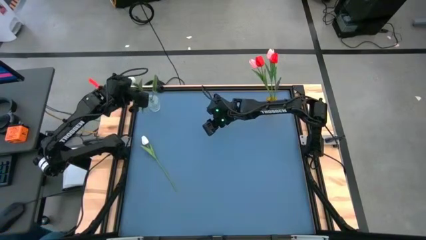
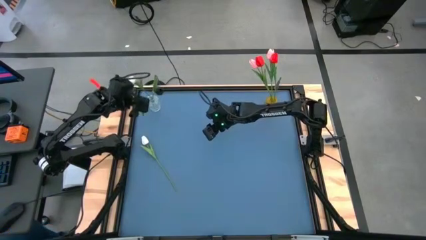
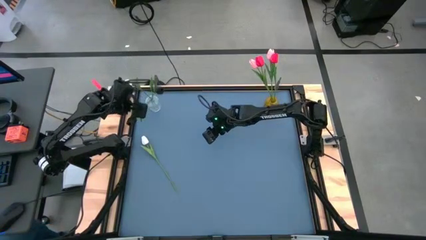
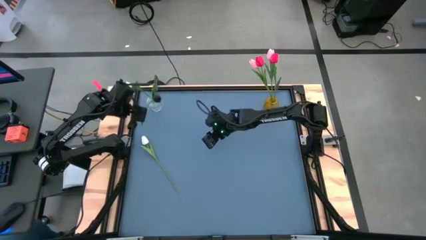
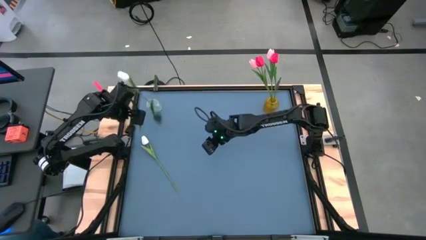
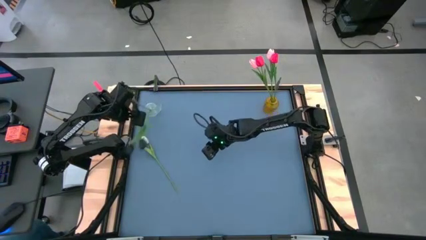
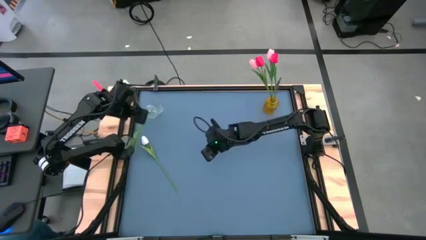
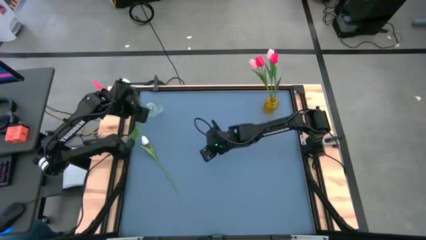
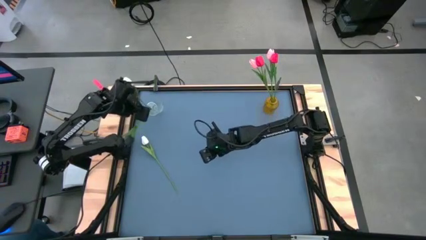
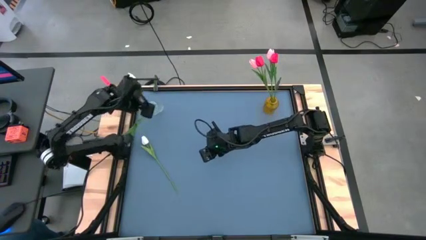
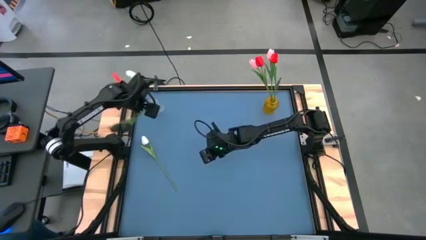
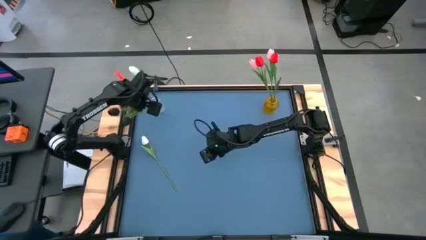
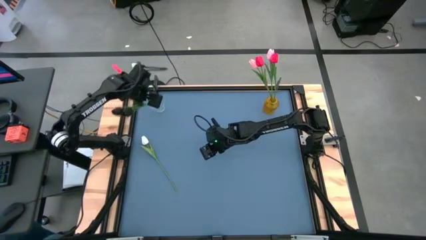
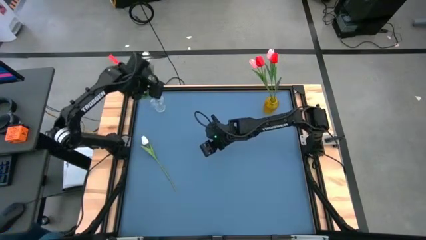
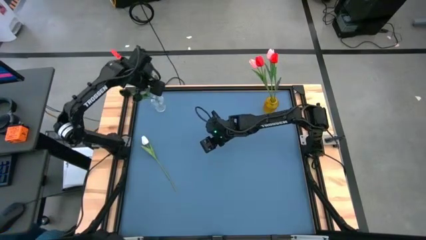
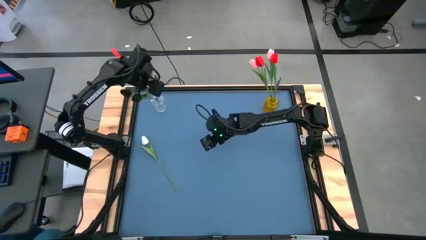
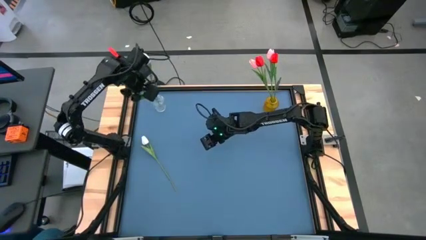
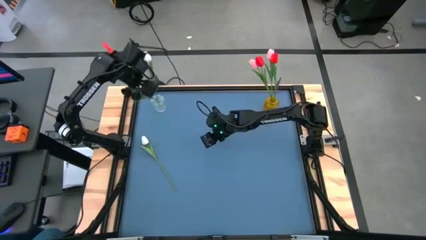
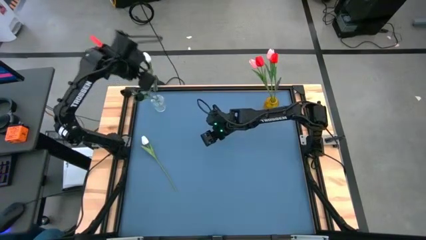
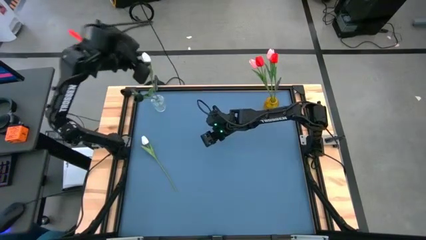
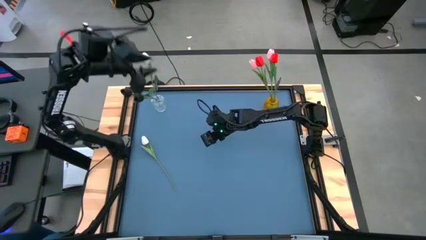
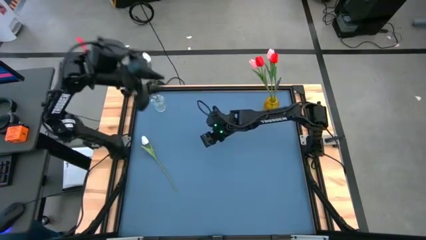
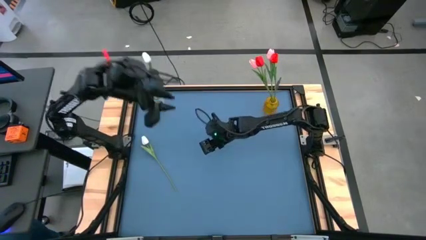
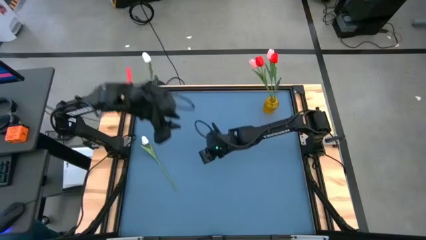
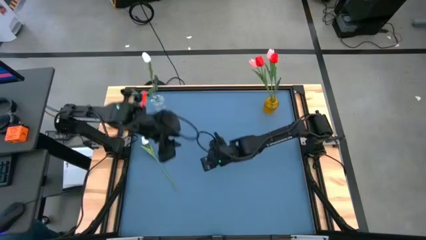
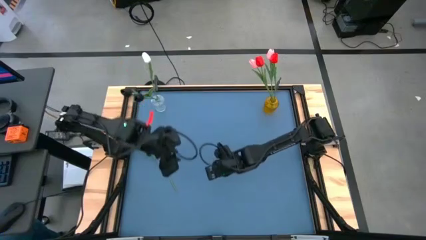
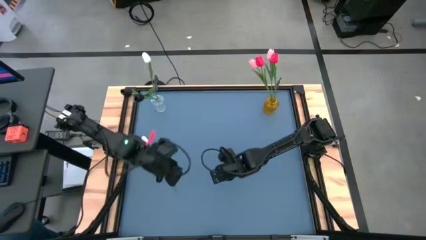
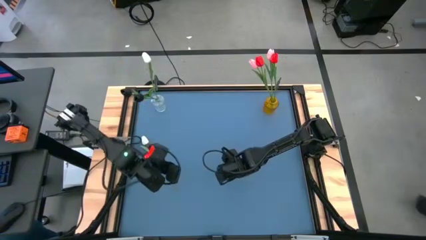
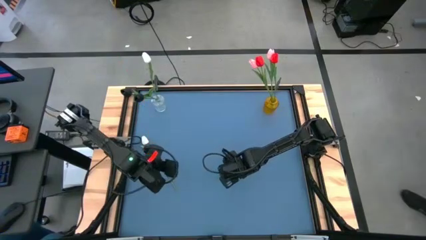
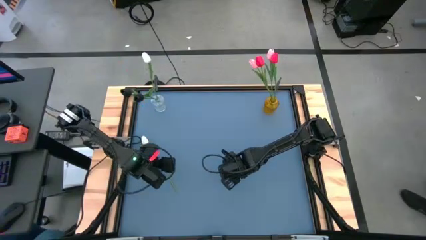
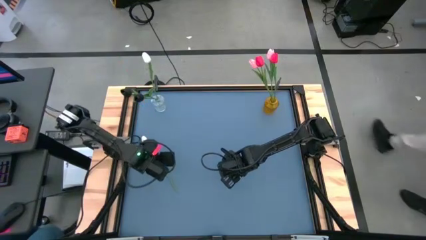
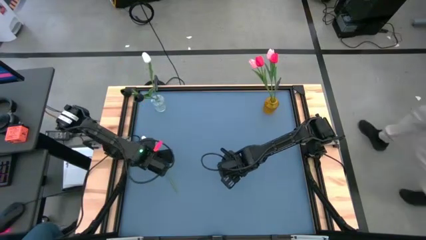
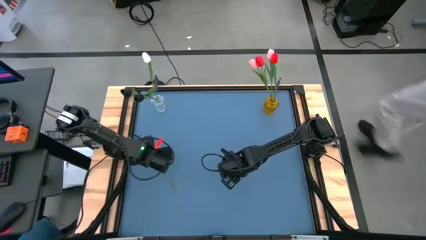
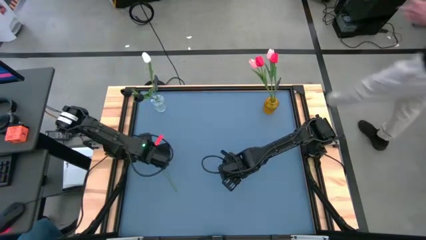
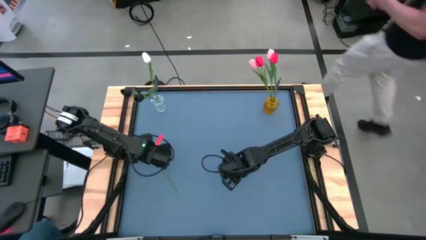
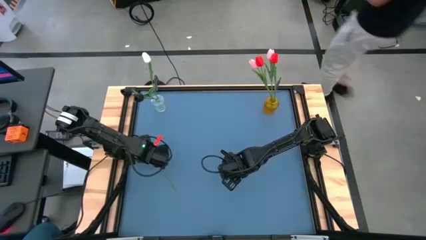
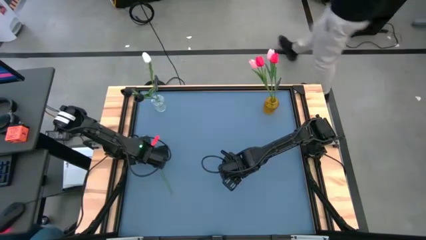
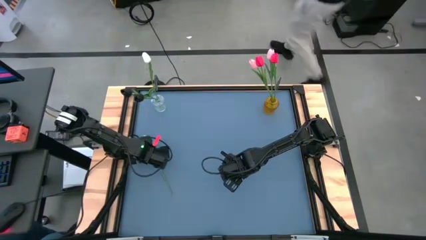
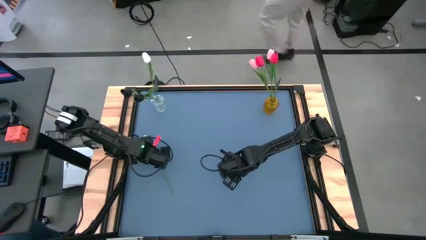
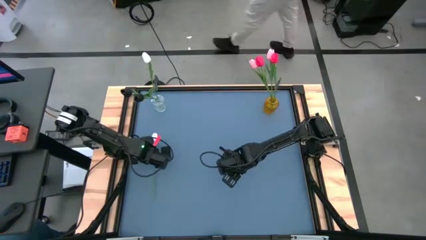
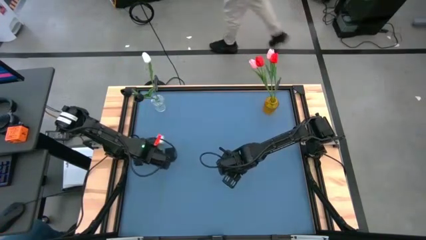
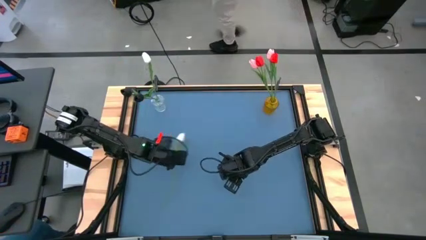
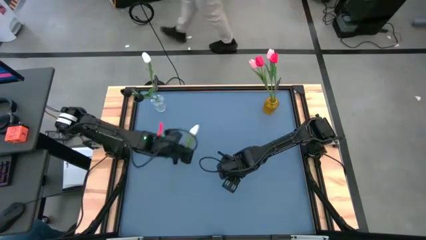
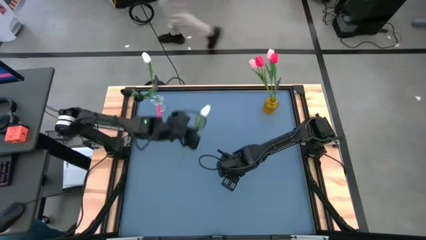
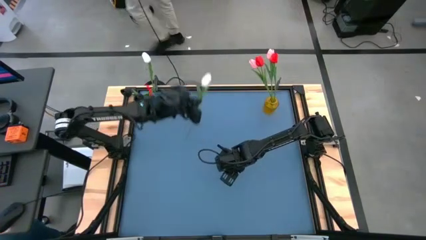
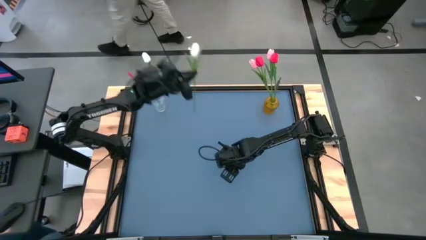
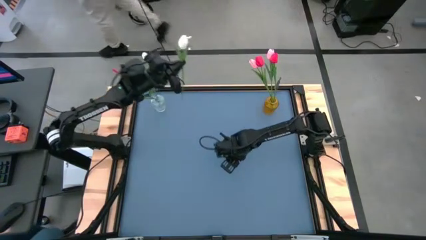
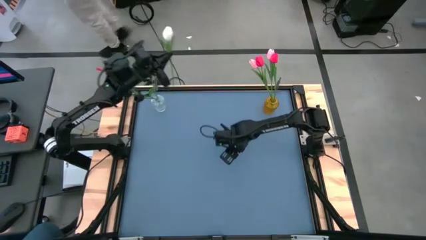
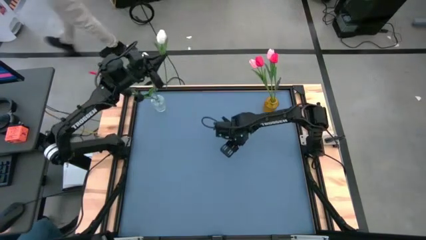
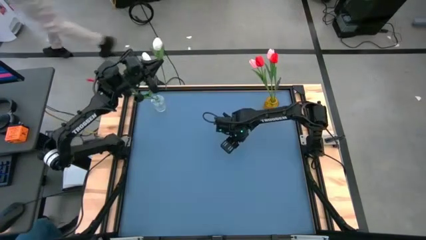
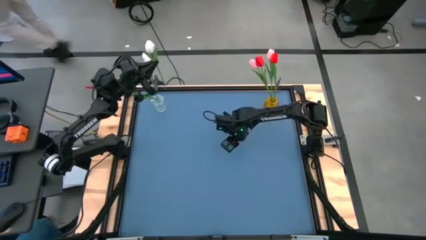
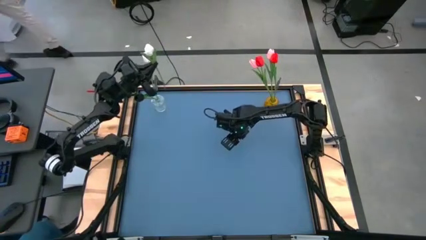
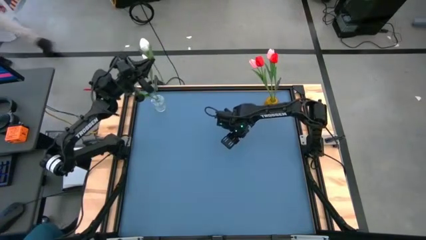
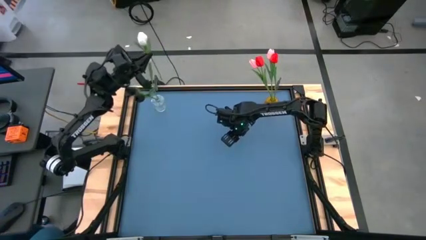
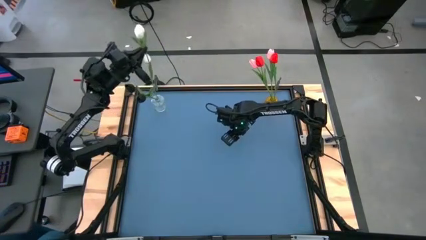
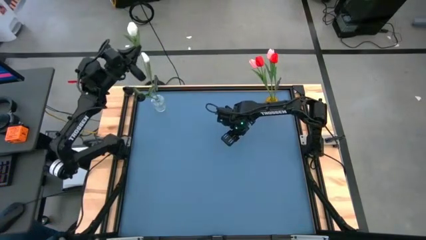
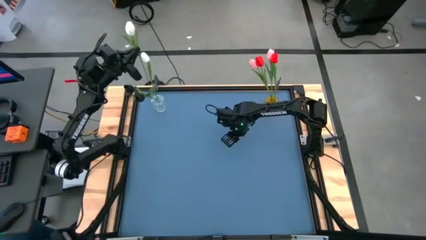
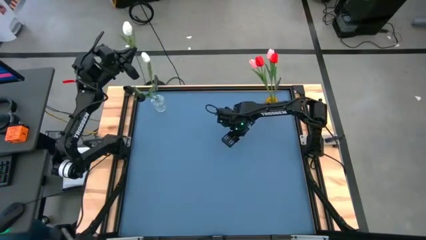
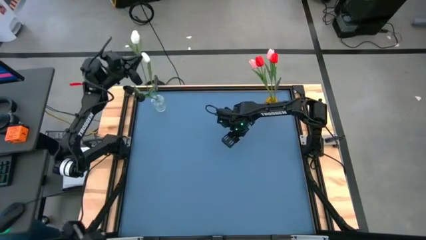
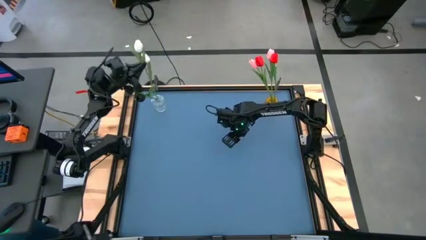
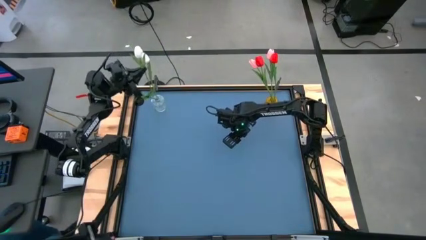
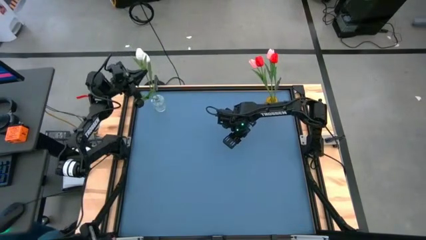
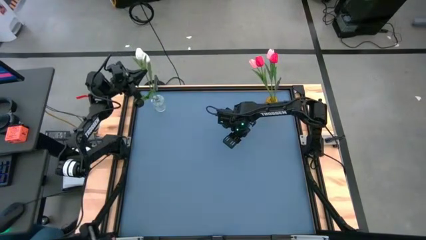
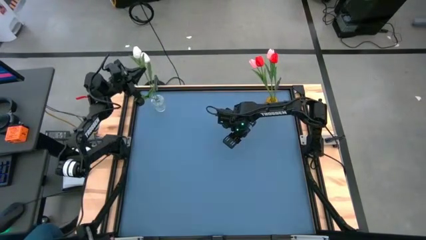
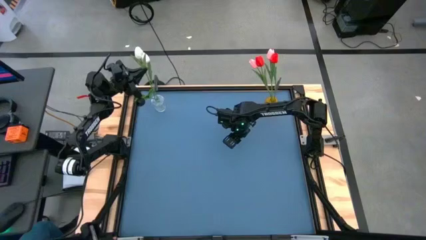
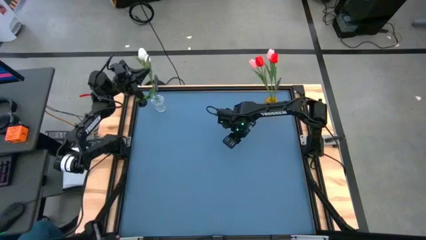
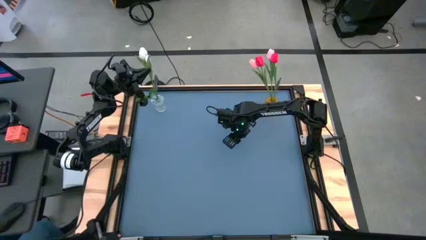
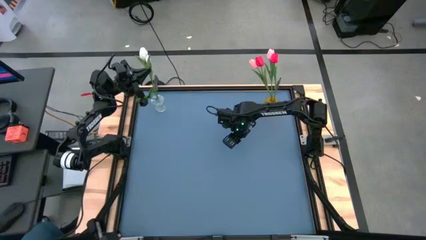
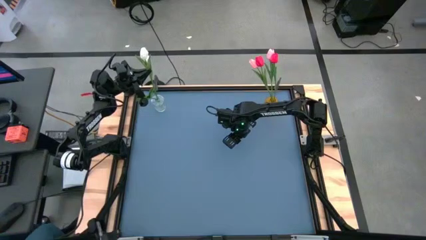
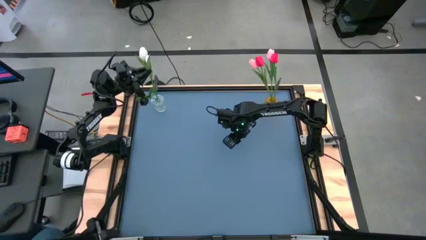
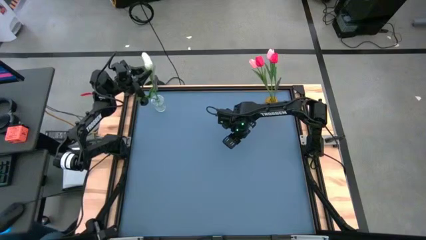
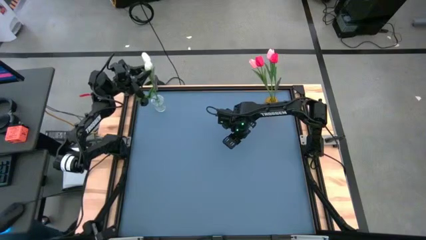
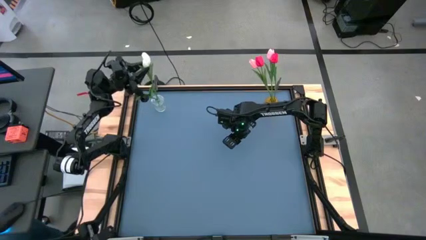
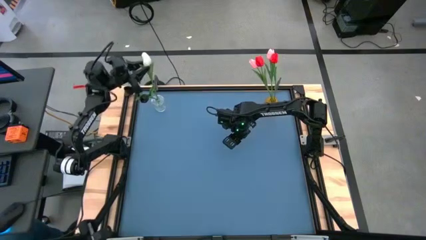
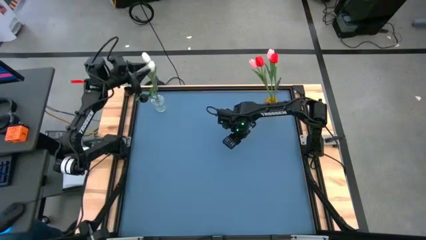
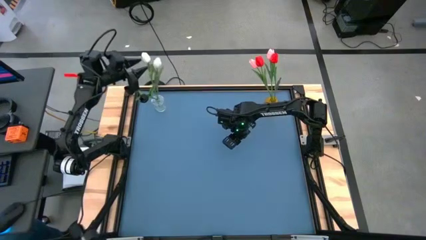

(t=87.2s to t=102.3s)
Task: Sort flowers into vase by color
Put the white flower into the transparent vase

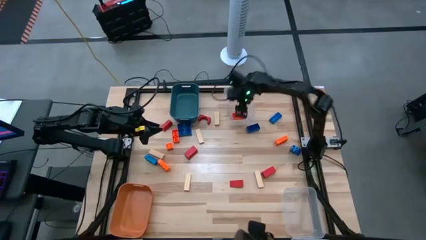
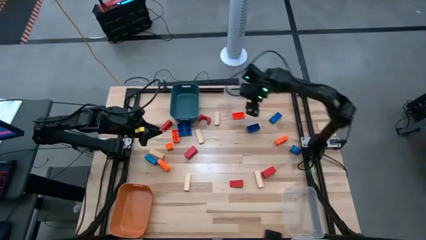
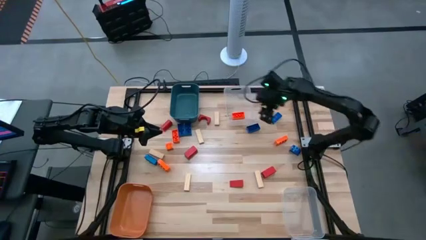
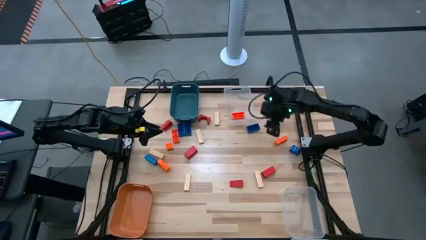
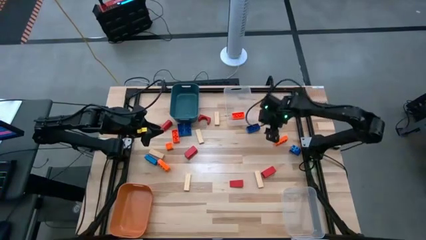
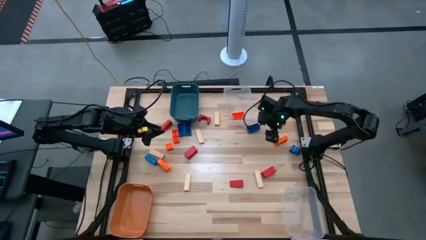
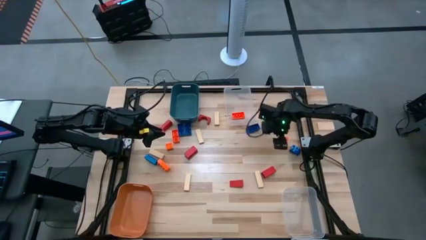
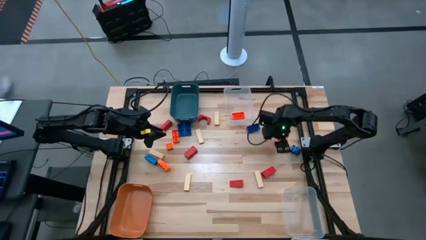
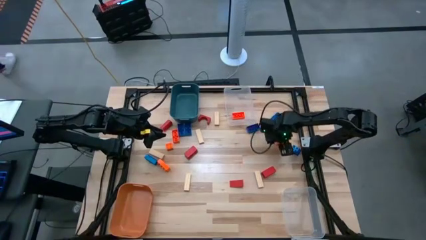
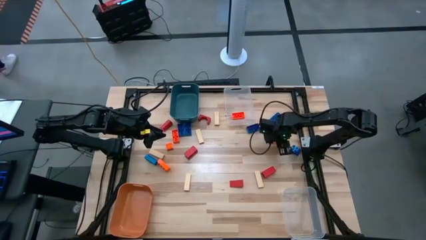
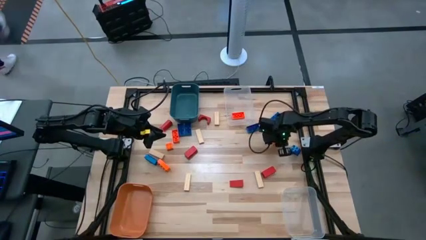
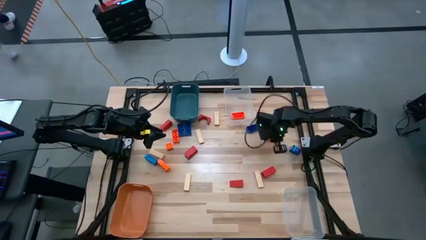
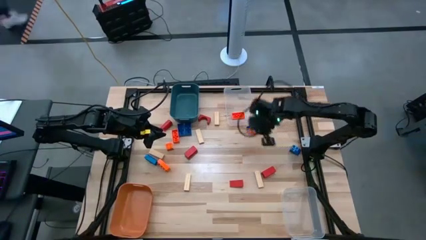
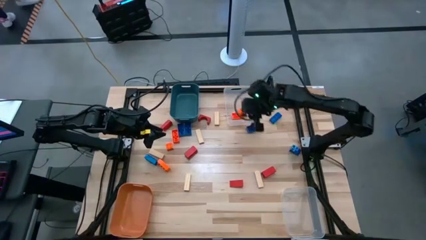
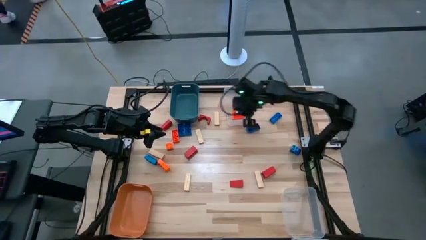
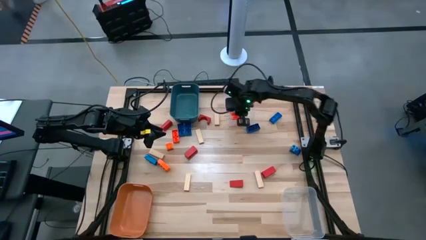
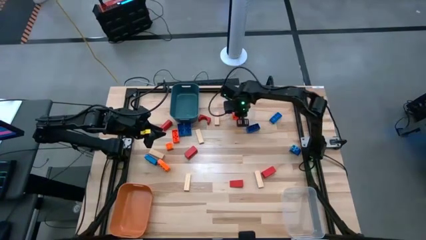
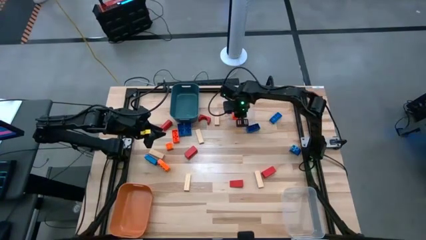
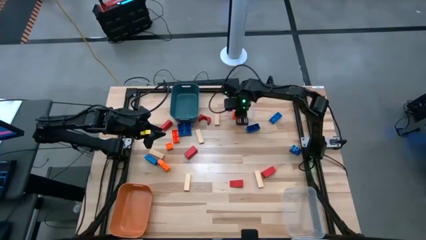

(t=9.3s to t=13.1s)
Task: Sort blocks
Put the orange game piece into the top transparent bin
